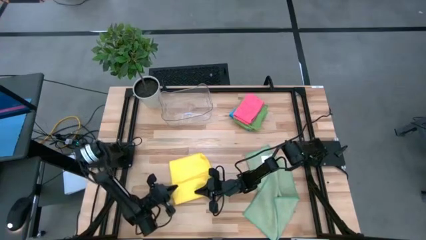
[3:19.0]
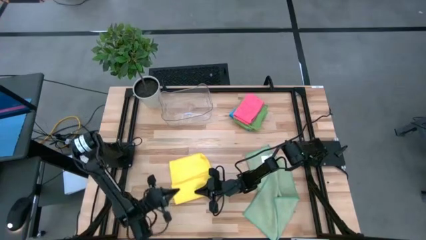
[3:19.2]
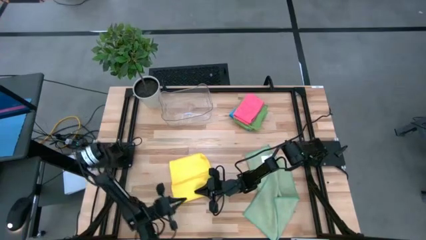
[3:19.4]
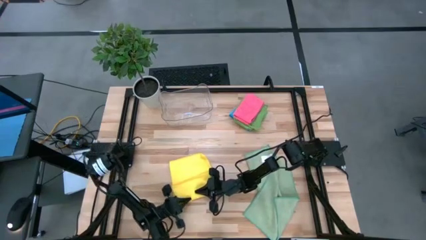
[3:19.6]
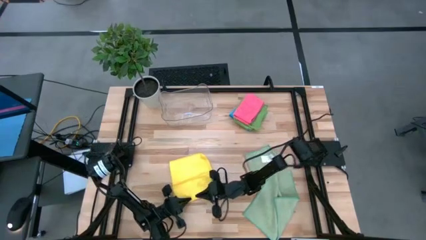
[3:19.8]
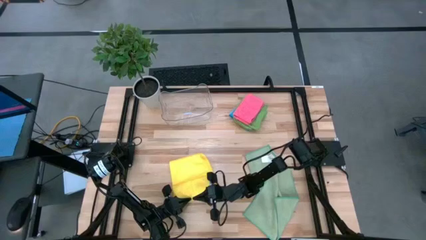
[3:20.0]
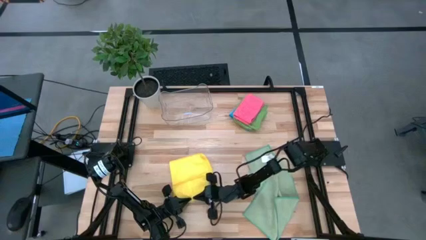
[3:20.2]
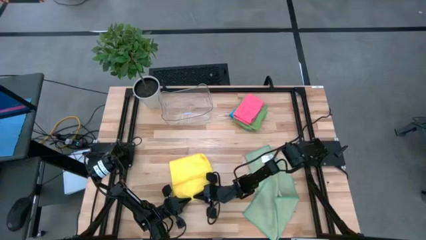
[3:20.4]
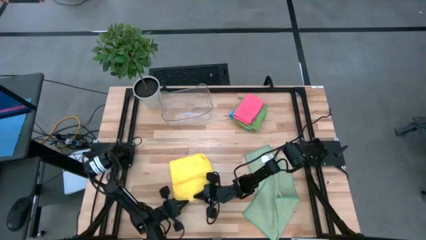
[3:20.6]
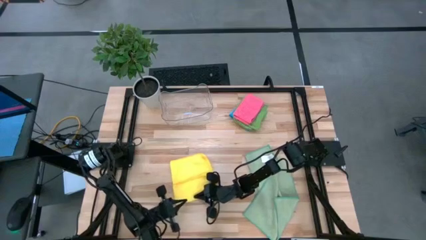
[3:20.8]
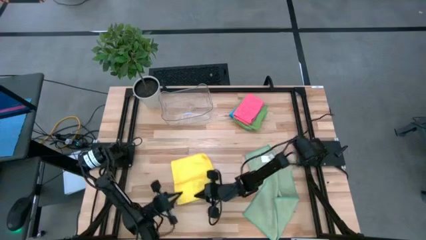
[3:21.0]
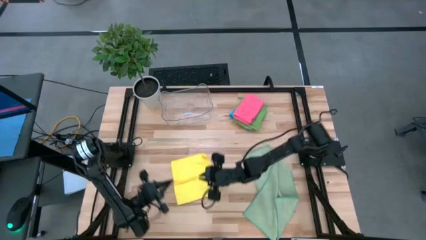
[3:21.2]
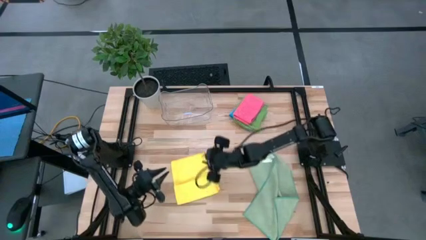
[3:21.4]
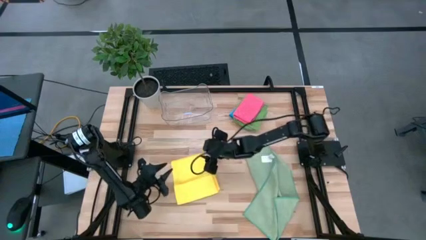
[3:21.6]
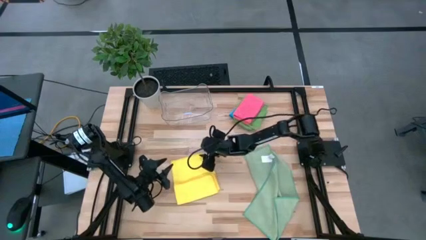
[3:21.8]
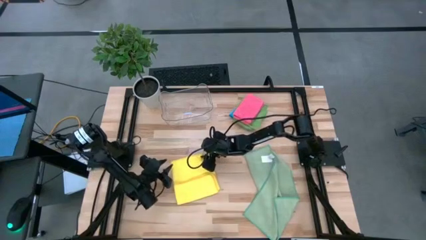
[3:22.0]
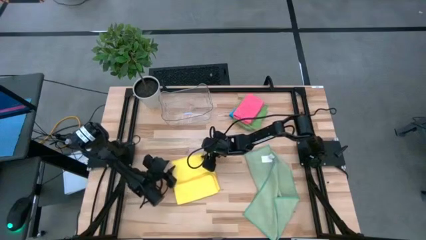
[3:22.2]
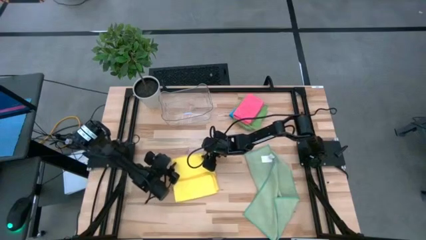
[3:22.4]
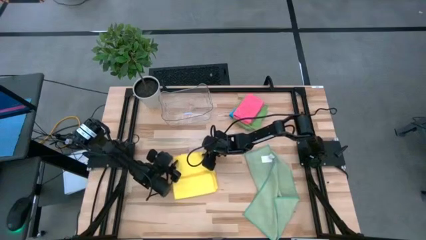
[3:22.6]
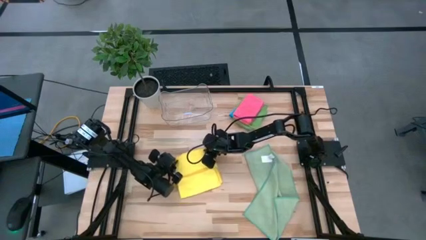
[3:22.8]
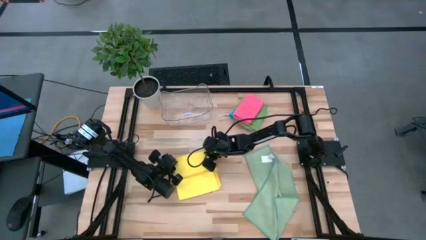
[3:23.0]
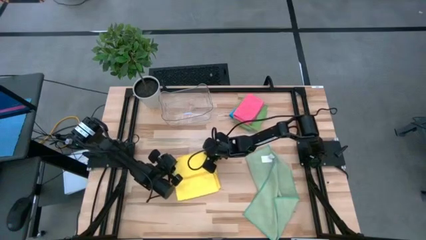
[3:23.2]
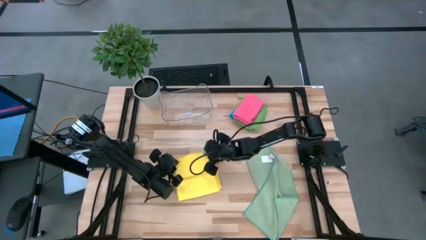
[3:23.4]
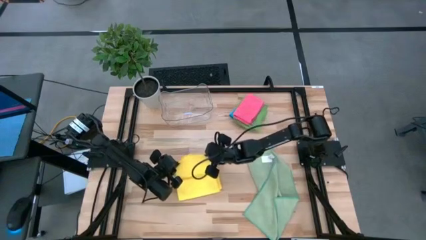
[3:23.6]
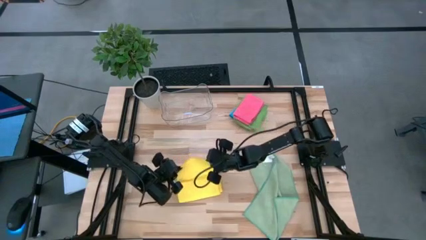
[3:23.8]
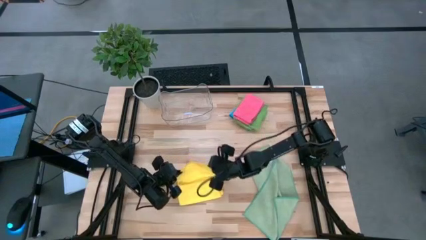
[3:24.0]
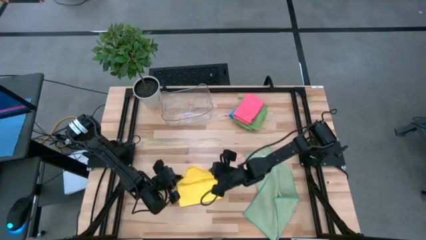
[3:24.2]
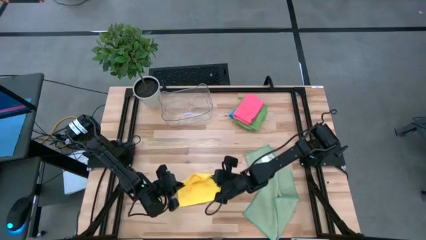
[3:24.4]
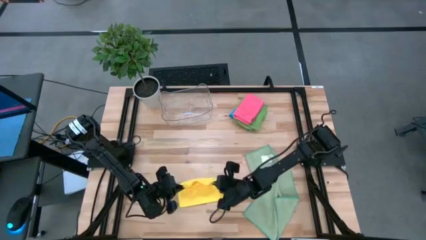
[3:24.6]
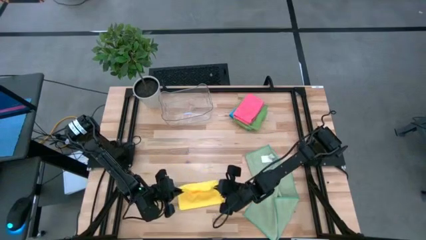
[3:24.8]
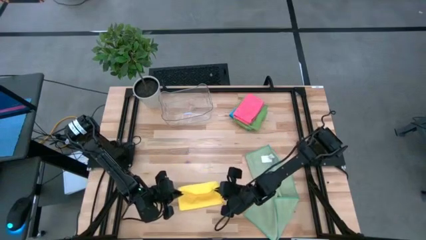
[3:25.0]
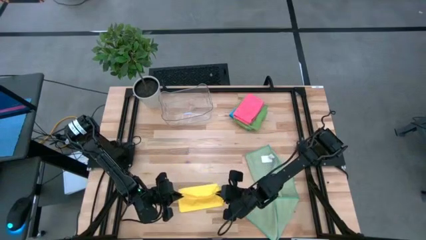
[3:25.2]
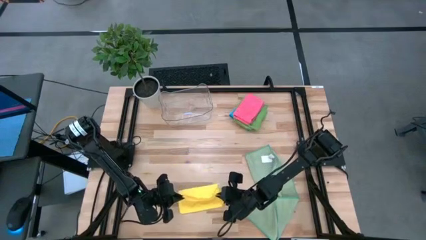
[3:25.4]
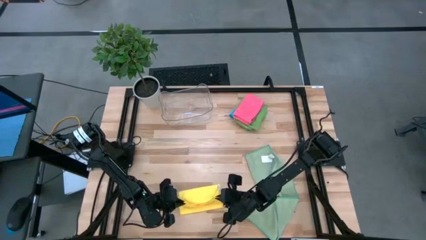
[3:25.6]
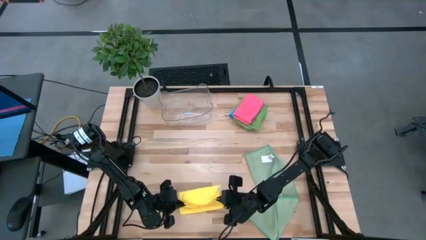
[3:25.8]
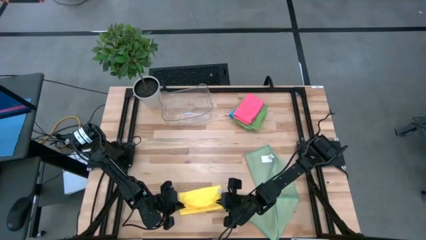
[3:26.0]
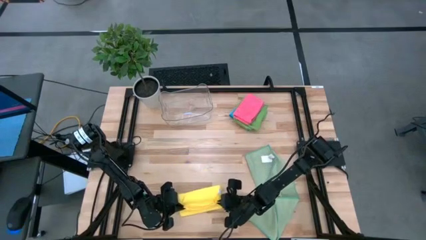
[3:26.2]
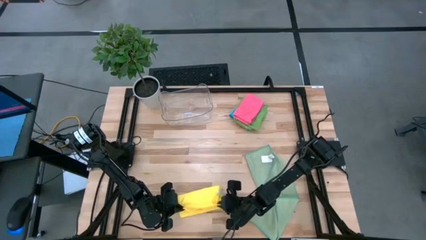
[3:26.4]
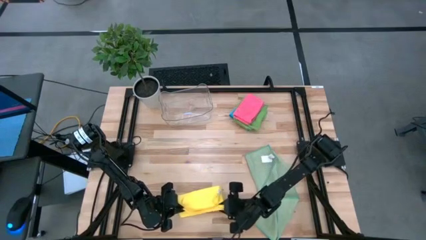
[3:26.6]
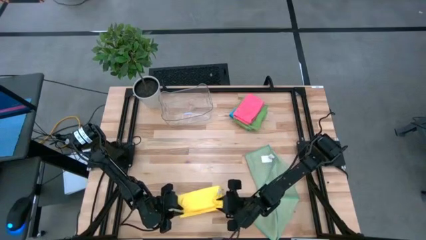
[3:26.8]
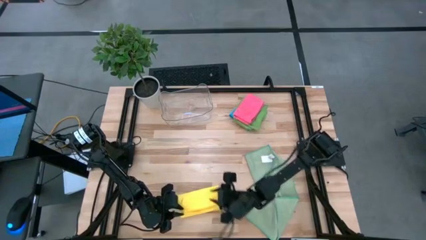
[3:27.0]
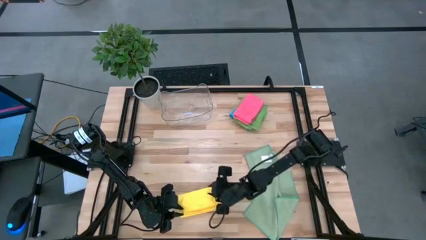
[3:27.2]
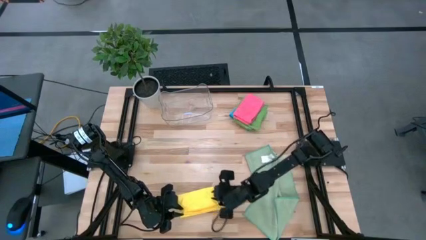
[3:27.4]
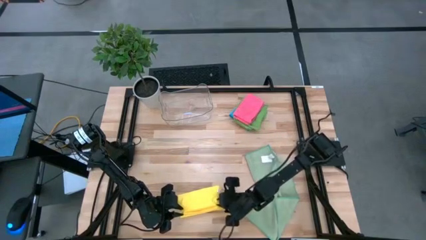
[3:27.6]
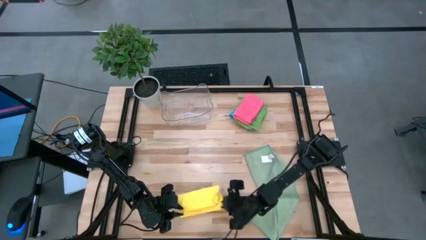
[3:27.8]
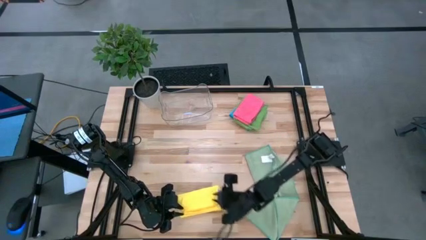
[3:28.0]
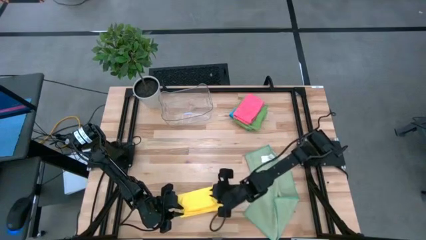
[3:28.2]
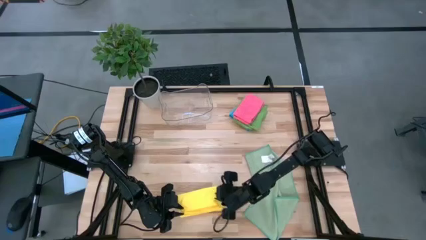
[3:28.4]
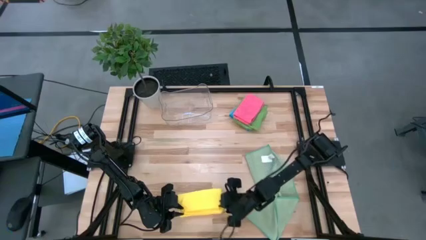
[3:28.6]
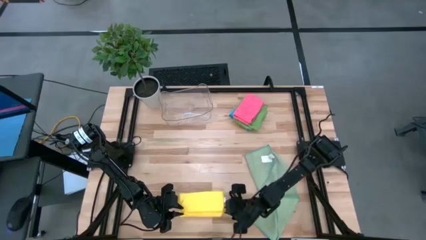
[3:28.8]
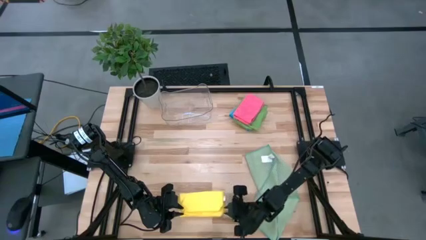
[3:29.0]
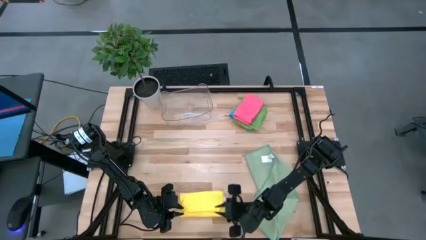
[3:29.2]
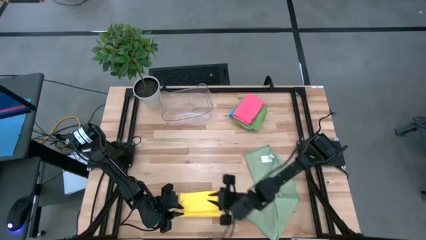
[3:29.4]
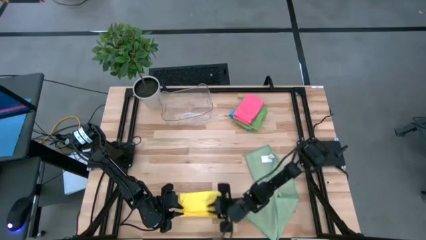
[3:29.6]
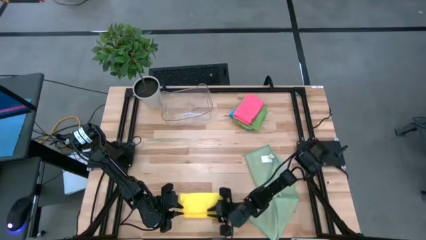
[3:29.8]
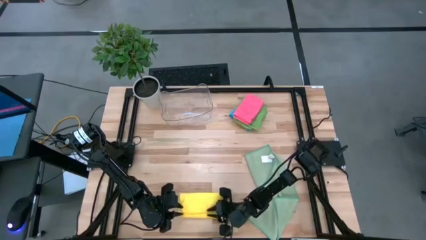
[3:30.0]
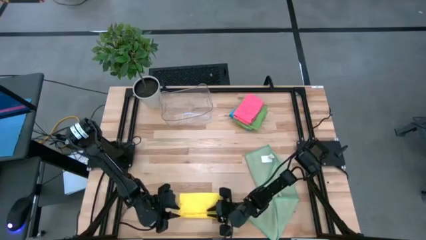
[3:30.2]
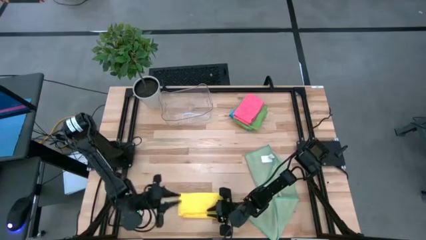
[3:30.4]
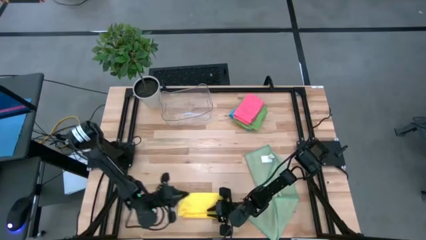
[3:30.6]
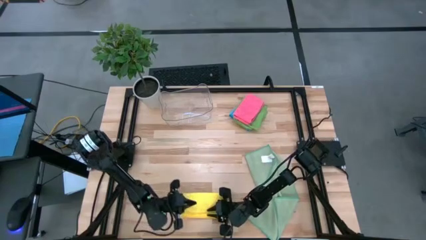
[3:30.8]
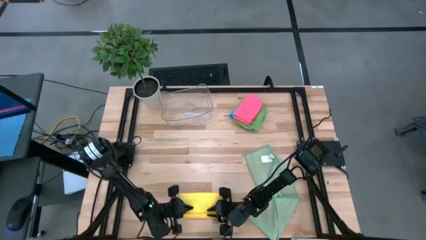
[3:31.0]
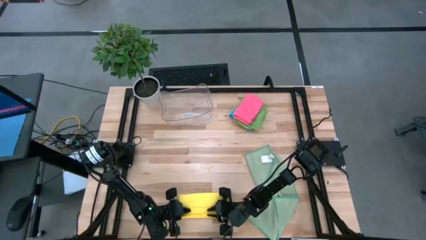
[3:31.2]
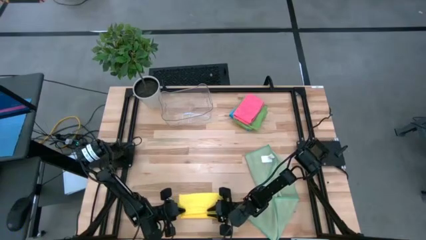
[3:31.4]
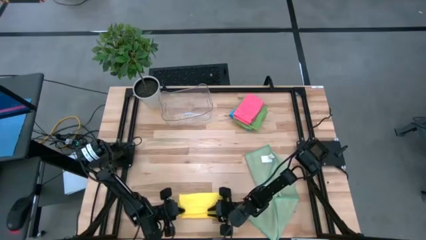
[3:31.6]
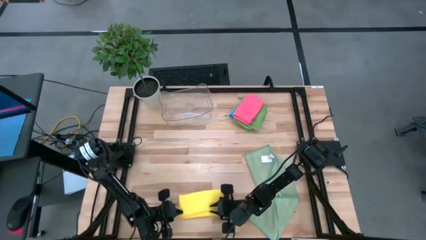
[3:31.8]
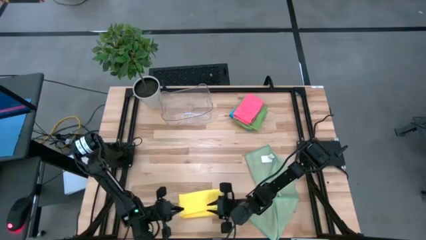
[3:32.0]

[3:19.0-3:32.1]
Task: Fold microfiber towels
Fold the yellow microfiber cloth

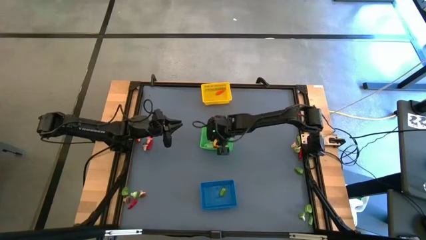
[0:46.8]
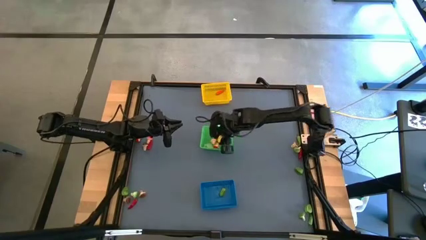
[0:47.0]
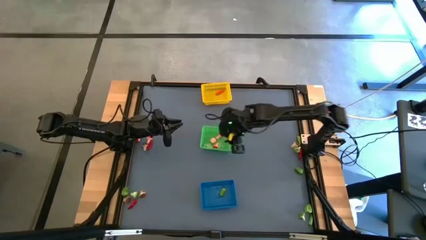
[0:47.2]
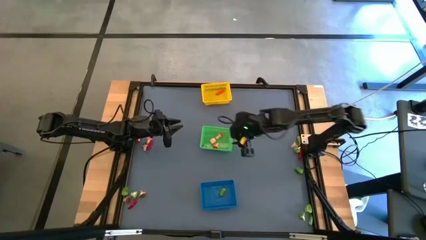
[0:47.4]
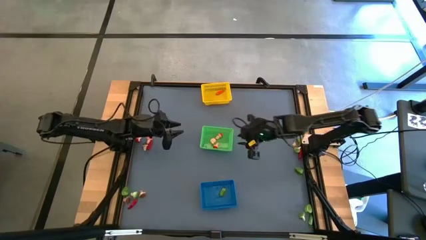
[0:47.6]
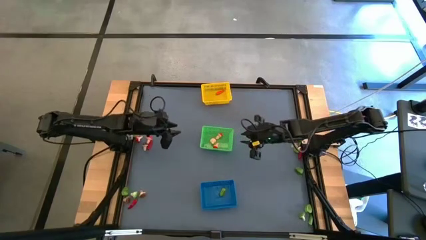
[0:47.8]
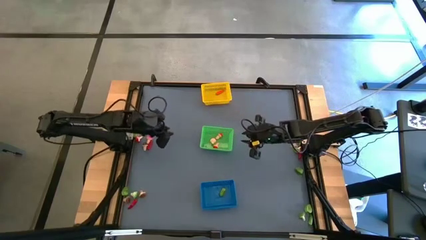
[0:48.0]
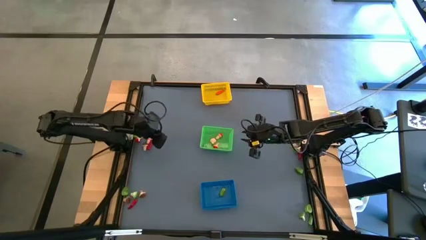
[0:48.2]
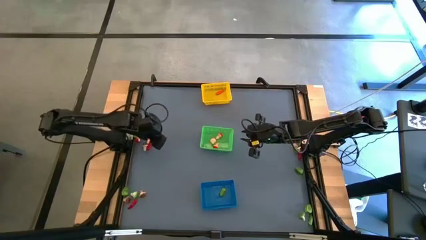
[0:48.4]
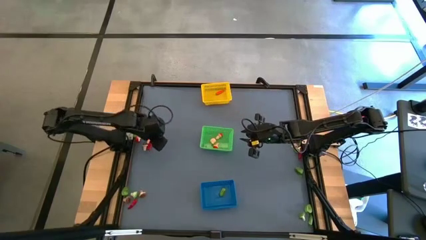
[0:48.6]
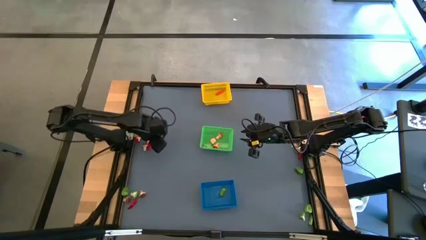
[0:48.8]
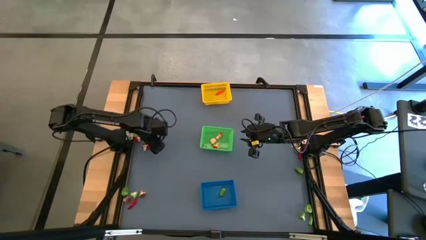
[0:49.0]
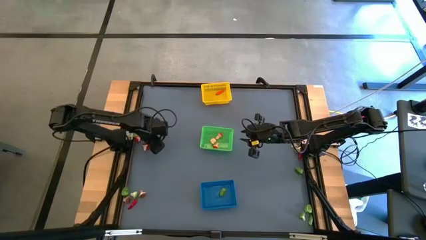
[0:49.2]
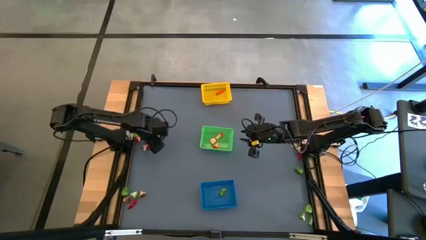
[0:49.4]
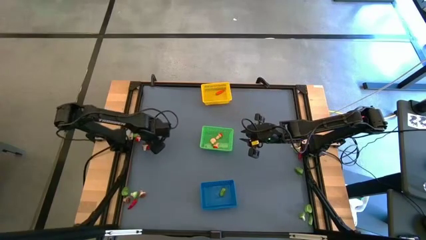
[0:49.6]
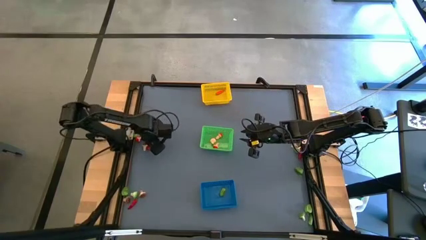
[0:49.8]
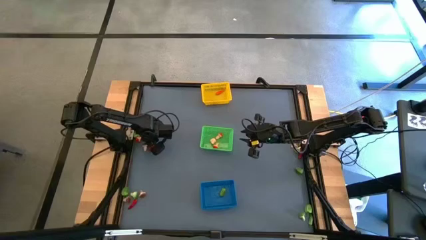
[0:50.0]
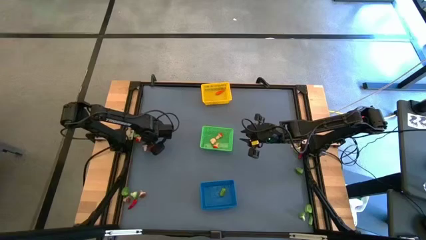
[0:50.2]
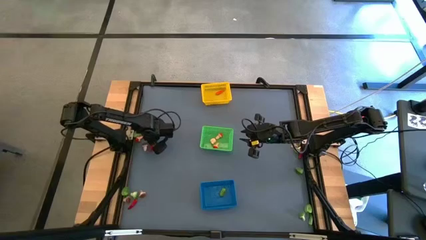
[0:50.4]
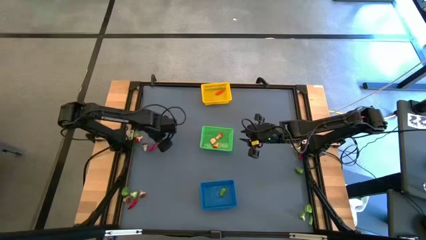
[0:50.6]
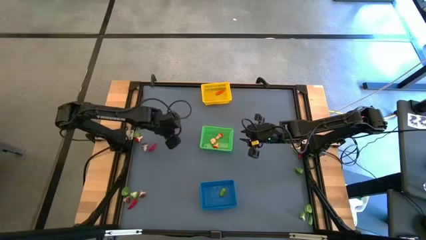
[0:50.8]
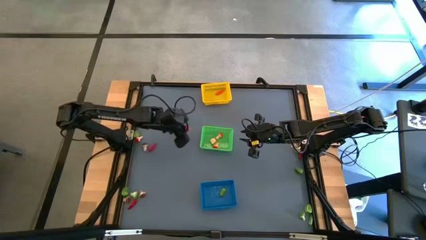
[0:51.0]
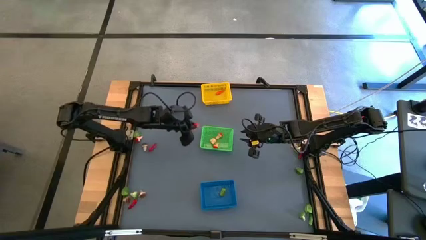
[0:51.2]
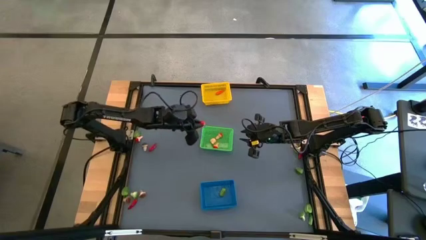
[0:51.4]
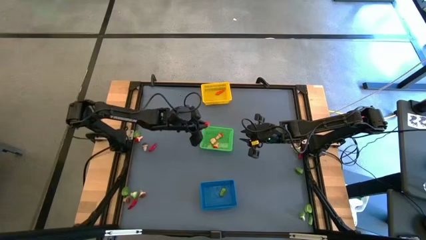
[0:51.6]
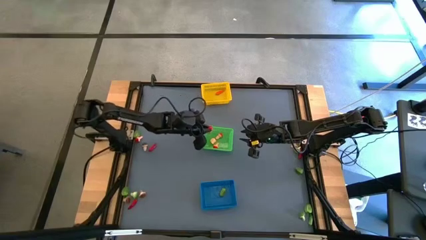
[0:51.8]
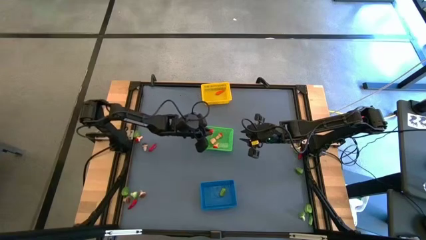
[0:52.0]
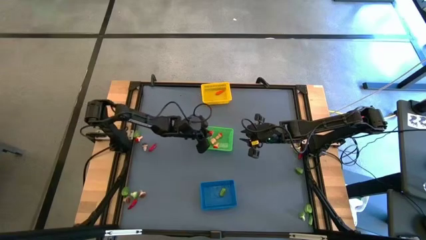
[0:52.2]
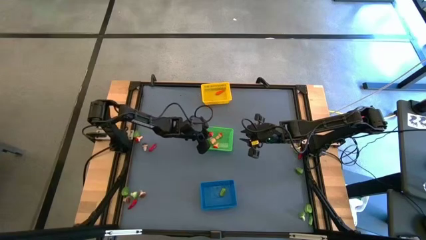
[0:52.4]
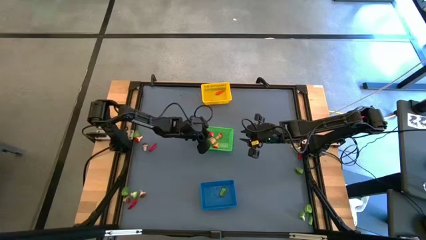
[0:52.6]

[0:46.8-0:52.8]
Task: Sort produce into baskets
Put the red mushroom into the green bin
